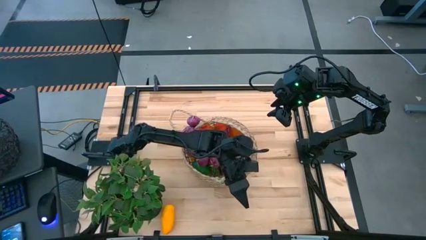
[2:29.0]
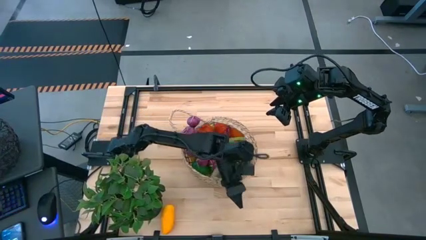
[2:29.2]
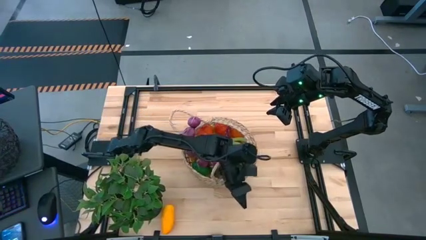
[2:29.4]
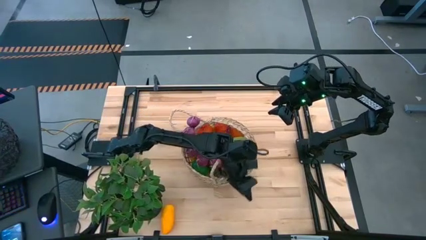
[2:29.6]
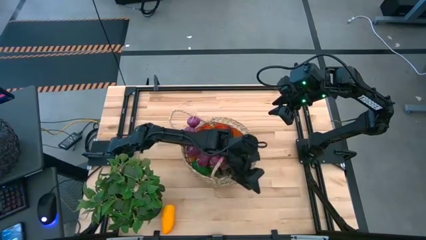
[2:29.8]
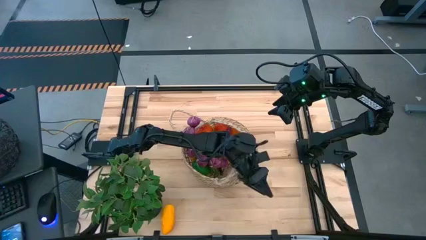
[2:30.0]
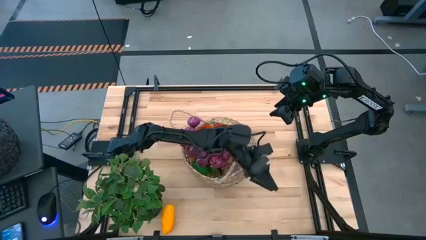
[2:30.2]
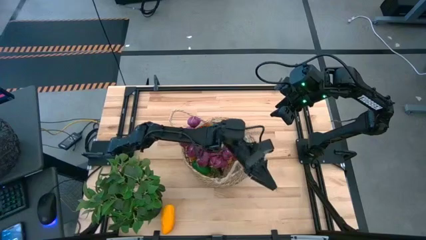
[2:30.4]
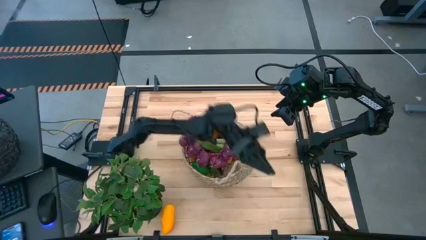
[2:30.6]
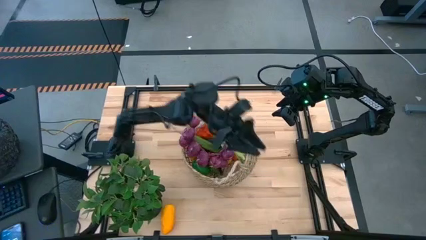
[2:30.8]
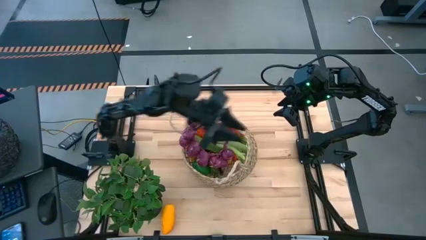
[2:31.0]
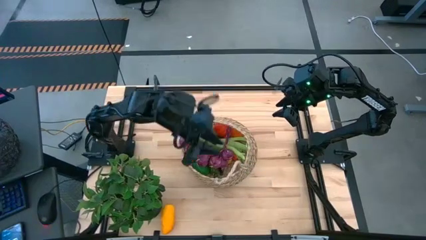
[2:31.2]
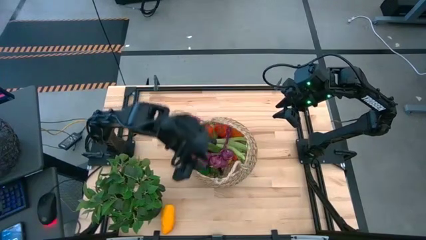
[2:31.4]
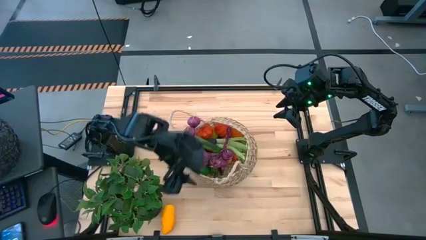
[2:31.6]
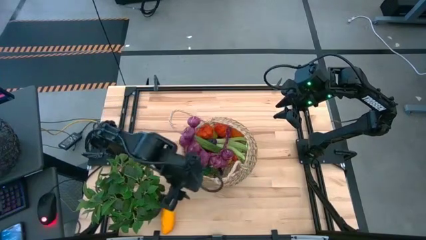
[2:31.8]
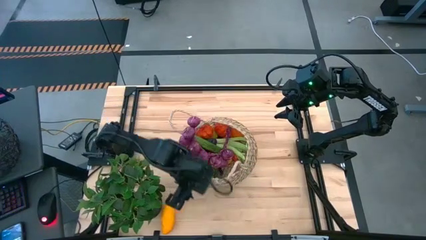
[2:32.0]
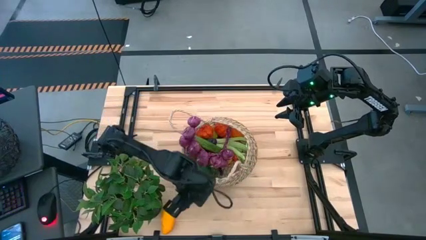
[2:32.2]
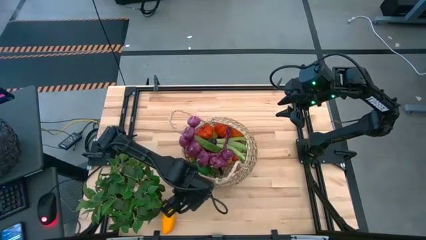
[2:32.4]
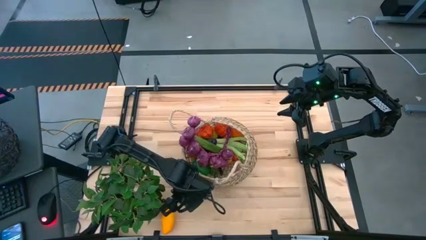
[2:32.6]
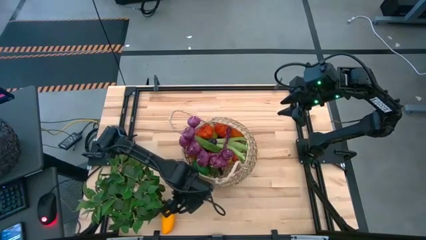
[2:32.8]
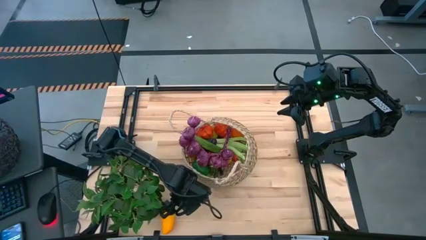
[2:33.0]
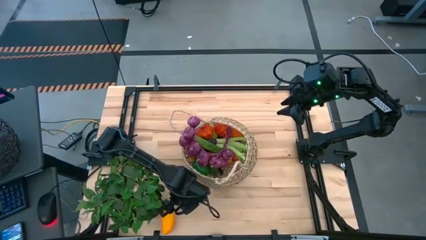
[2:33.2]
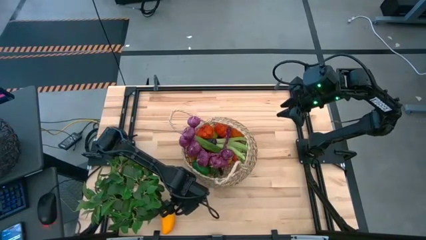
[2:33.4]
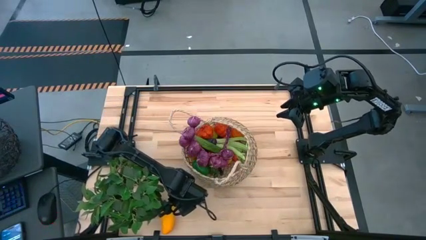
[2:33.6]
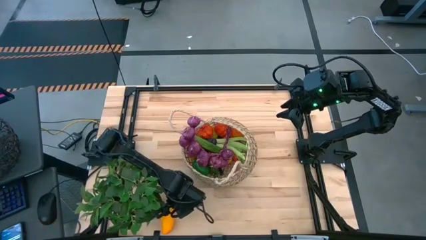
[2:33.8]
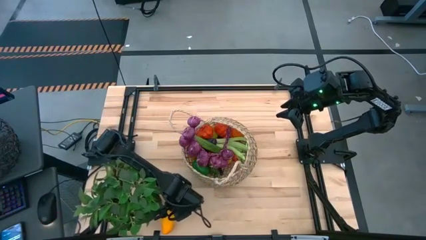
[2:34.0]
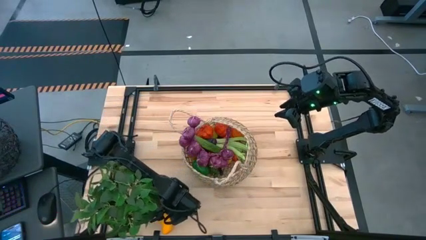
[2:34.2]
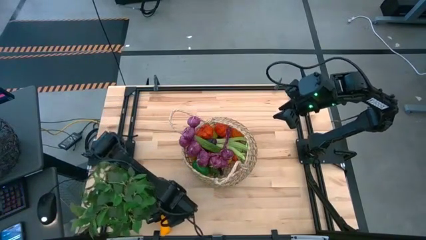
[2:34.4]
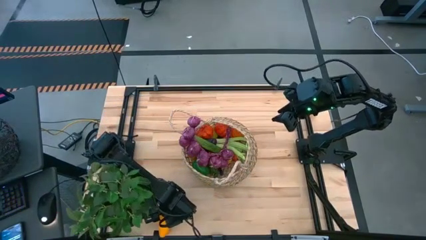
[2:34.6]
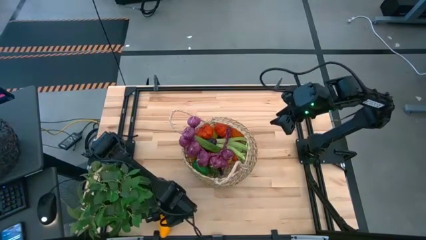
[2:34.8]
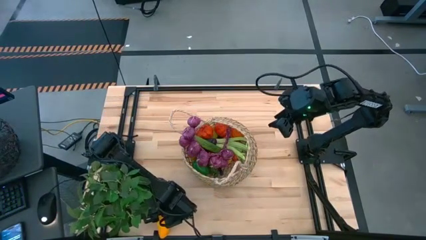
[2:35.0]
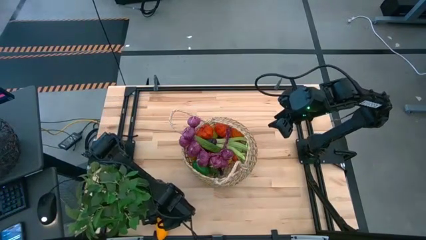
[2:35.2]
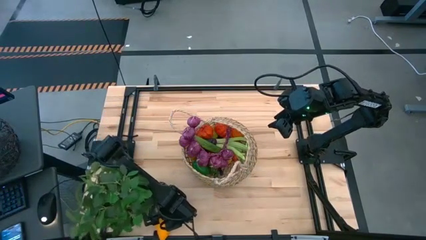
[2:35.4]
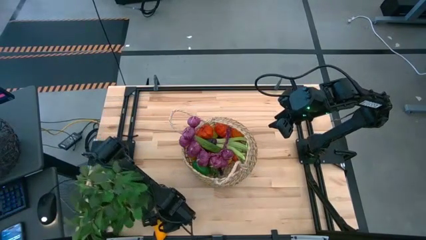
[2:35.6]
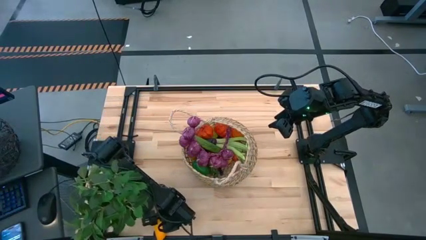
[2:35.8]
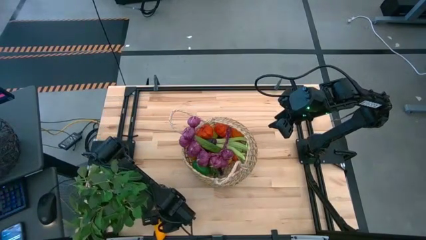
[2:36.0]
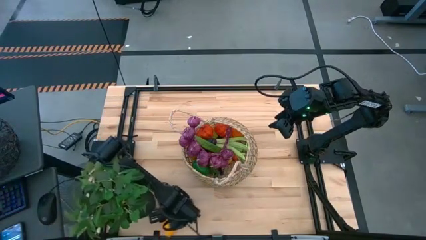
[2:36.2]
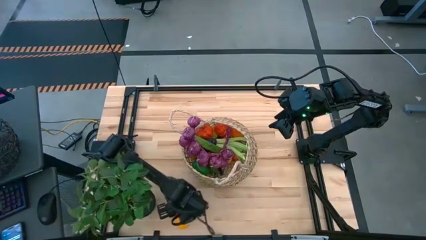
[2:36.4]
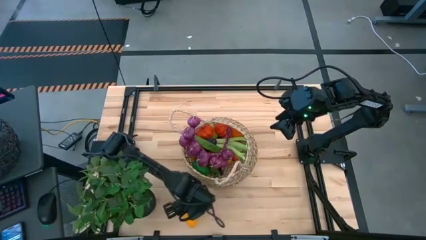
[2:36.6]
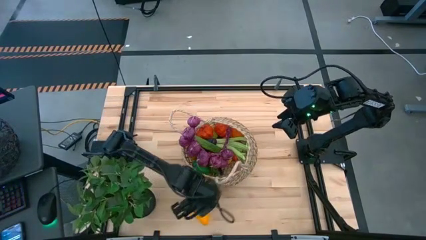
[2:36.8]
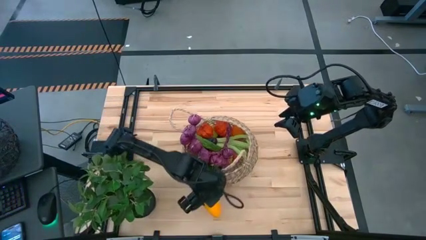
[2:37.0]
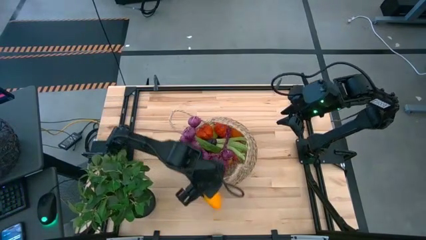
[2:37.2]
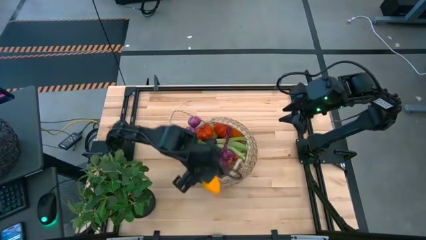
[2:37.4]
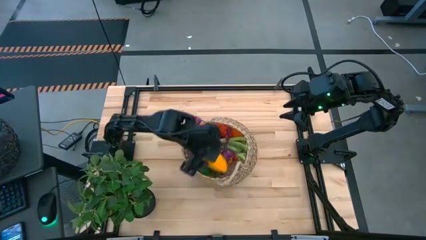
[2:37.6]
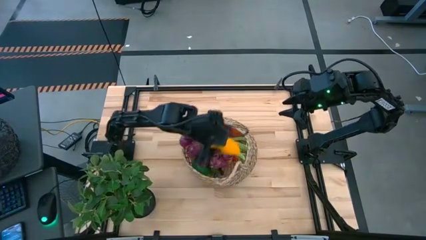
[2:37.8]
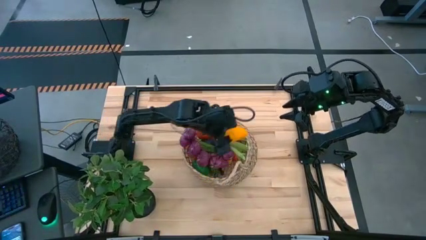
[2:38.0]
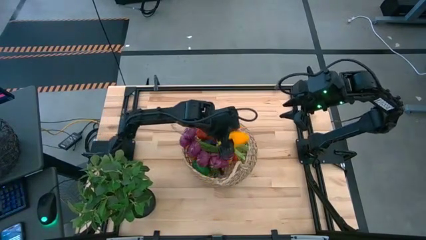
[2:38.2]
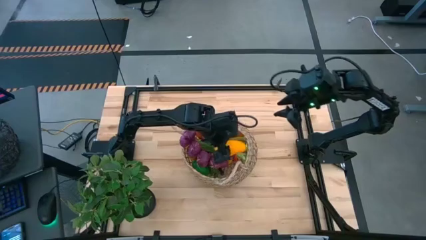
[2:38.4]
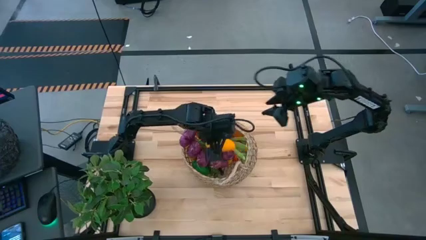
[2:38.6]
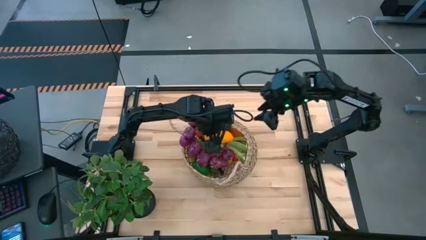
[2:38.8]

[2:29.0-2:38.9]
Task: Build produce basket
Put the yellow mango into the brown basket

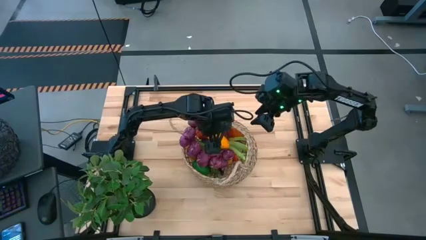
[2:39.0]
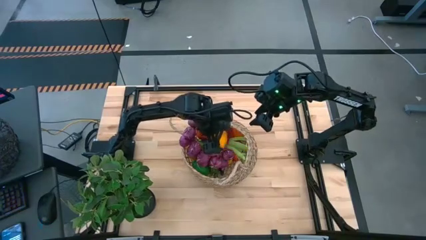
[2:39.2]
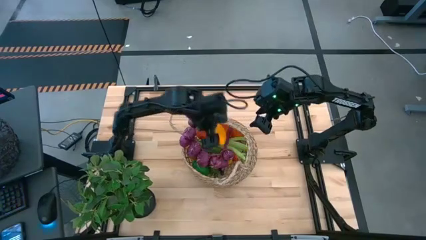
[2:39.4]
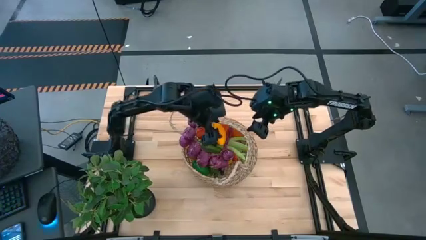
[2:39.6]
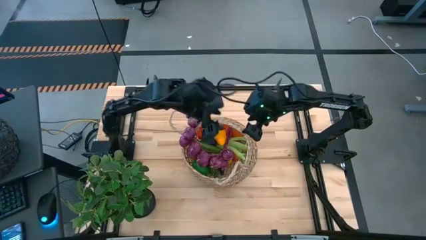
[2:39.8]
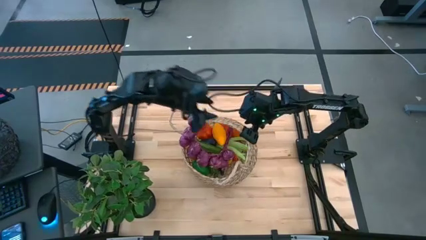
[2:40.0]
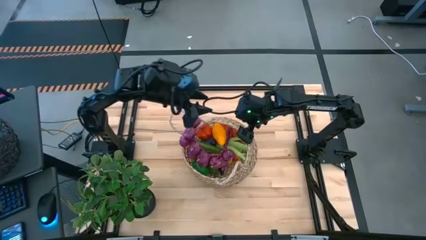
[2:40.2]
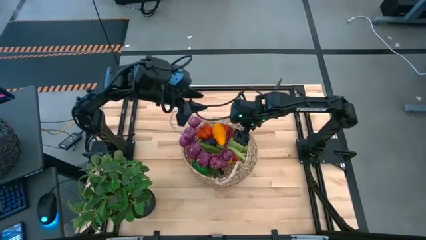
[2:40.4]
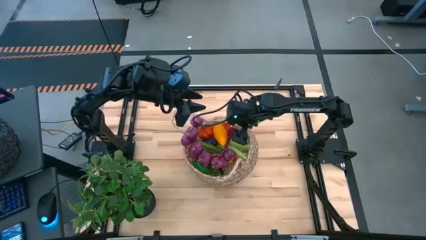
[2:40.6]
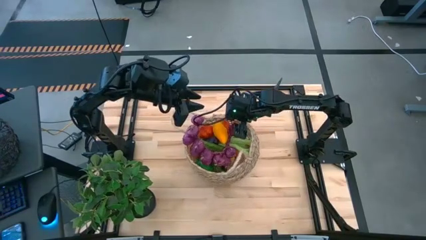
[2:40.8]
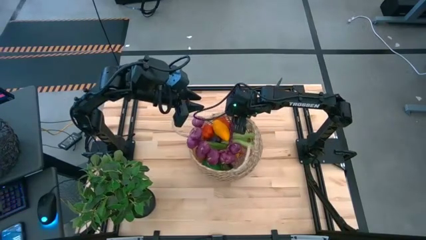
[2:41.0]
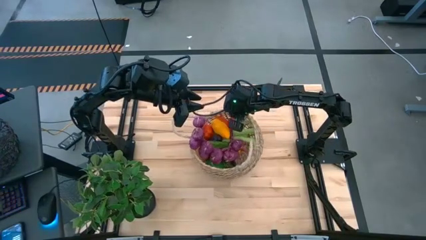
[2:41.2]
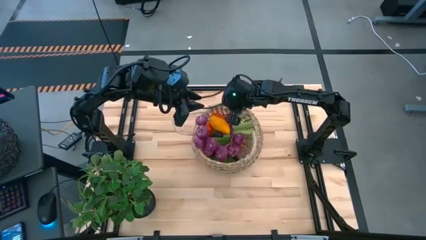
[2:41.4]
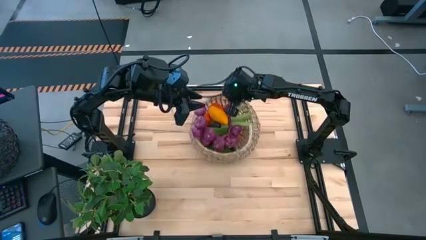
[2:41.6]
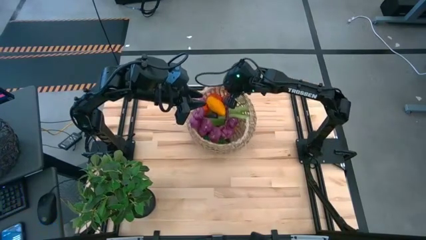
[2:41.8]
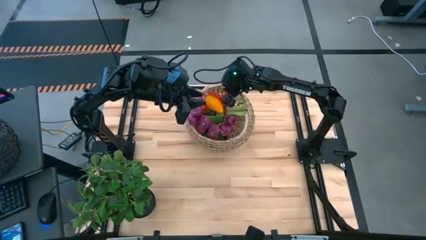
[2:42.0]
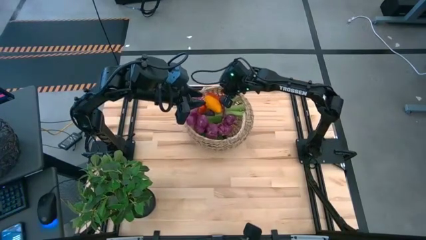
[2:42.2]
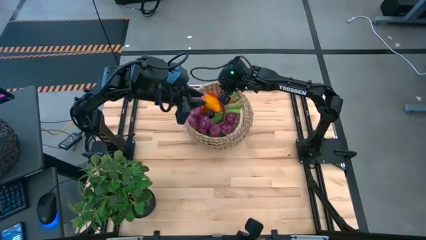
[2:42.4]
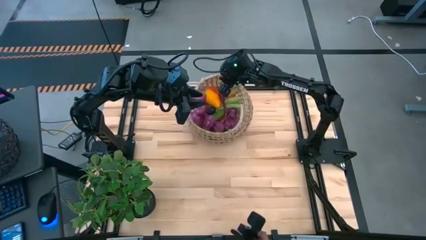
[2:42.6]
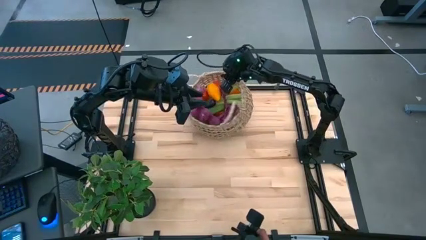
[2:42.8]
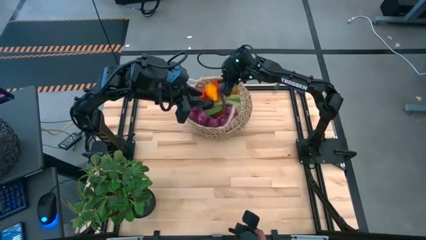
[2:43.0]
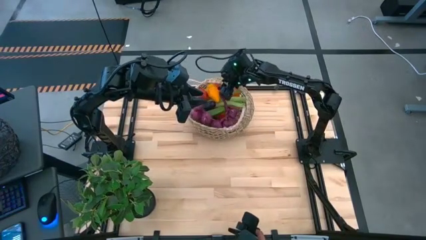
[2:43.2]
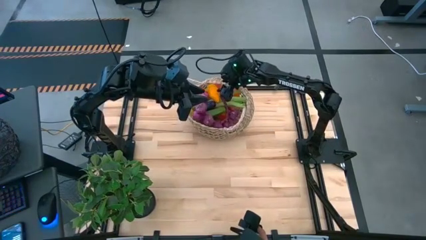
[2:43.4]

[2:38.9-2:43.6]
Move the brown basket to the top of the table

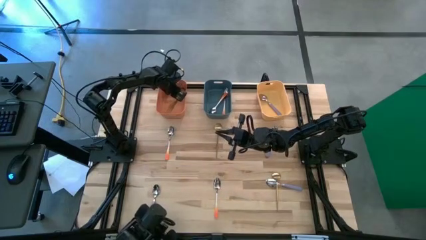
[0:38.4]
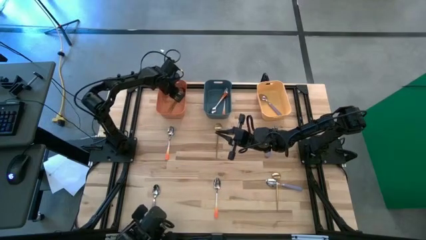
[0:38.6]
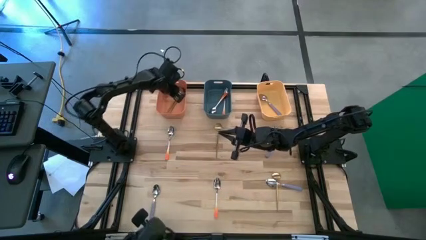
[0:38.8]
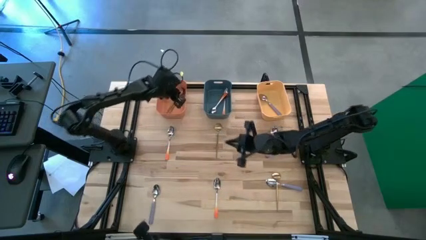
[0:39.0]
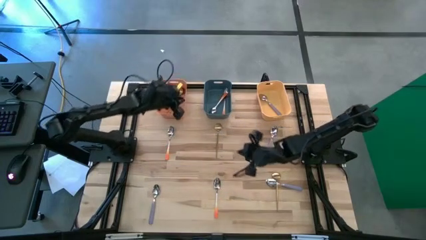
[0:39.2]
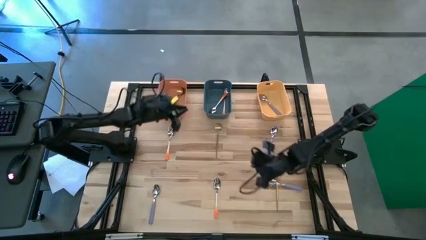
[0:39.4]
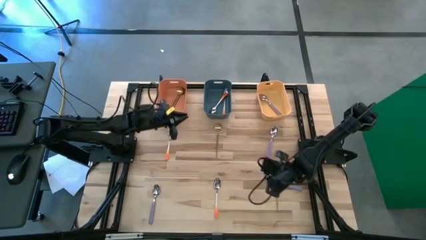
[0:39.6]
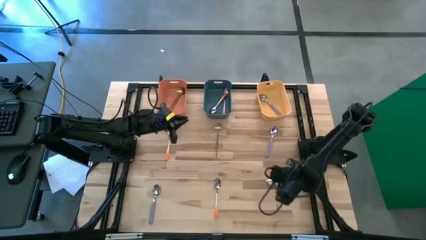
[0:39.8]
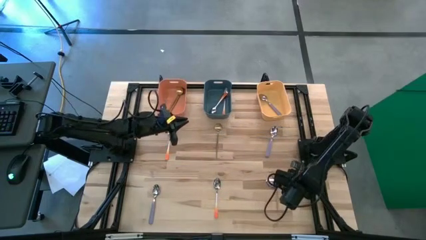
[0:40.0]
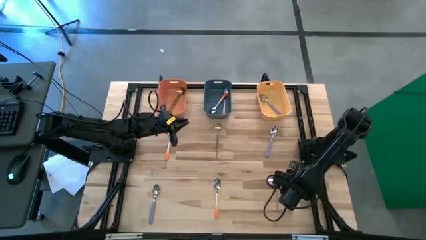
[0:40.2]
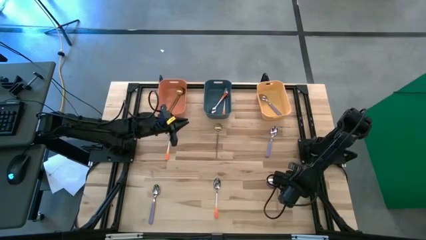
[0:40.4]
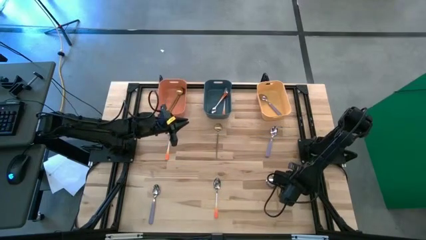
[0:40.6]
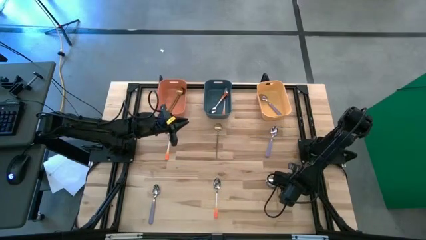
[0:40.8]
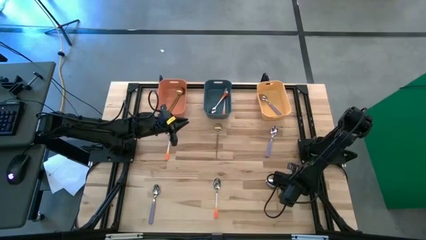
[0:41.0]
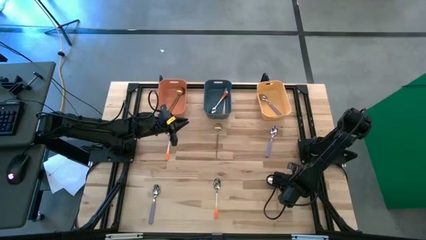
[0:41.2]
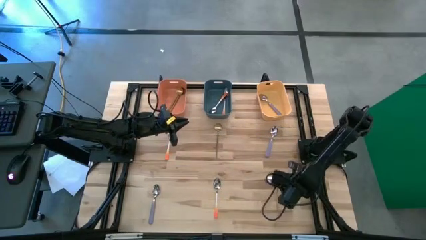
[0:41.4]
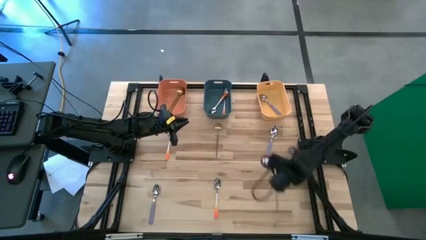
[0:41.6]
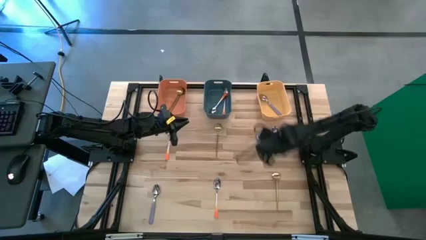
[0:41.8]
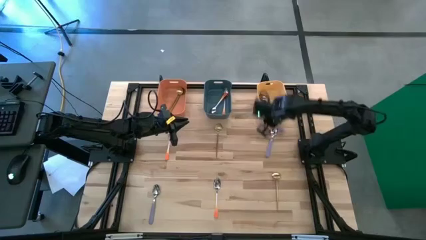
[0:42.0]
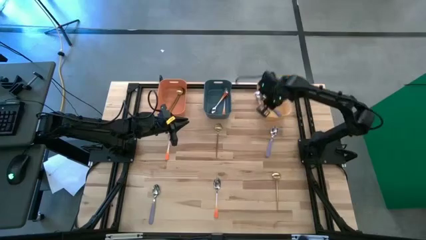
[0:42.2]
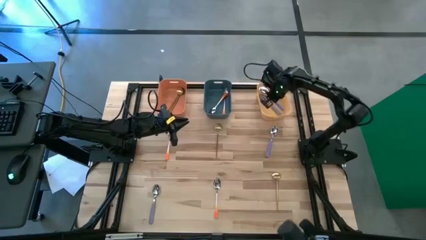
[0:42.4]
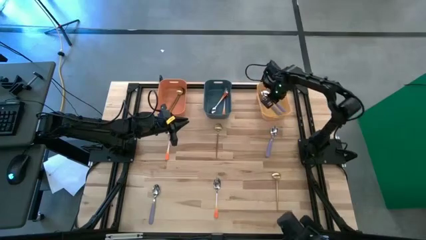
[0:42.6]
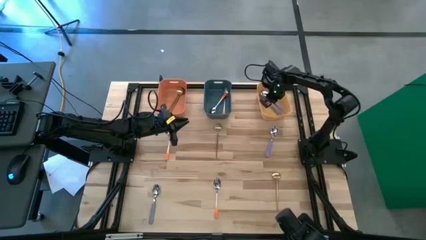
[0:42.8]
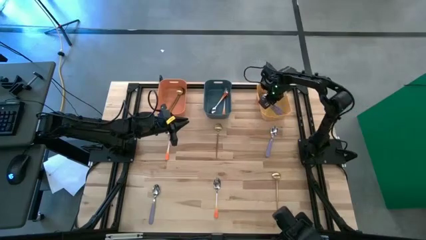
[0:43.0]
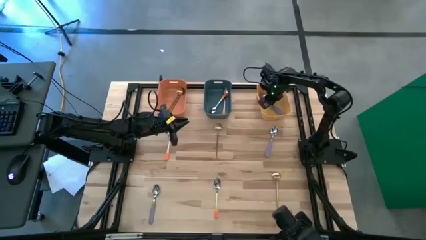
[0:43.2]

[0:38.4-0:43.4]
Task: Sort silverware by color (type)
Put the purple spoon into the yellow bin
